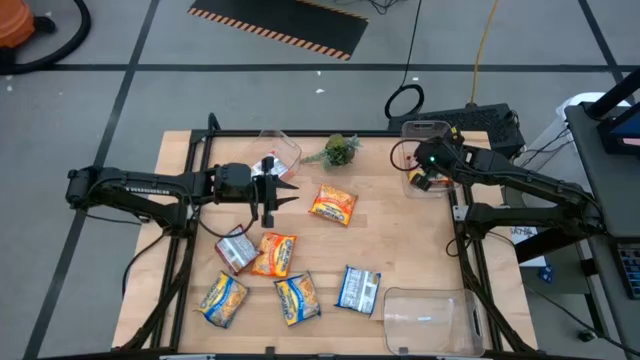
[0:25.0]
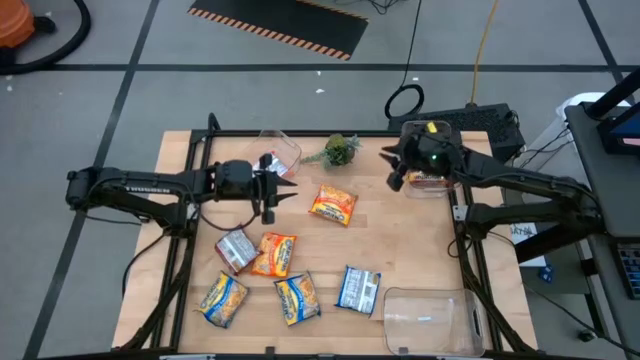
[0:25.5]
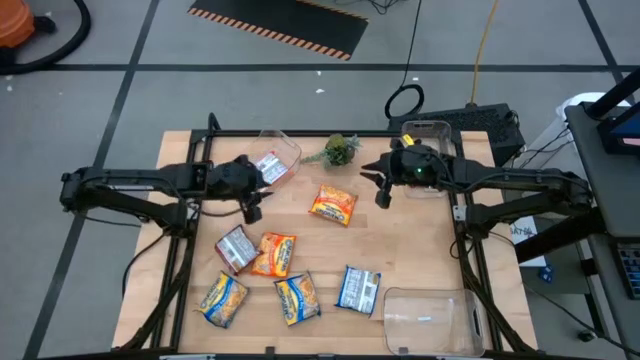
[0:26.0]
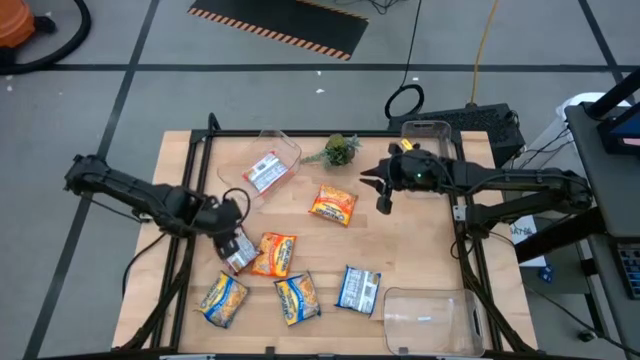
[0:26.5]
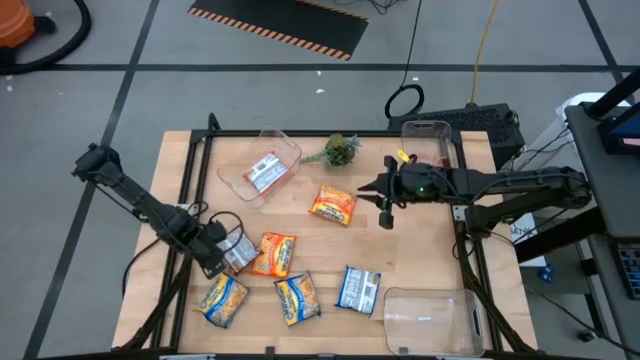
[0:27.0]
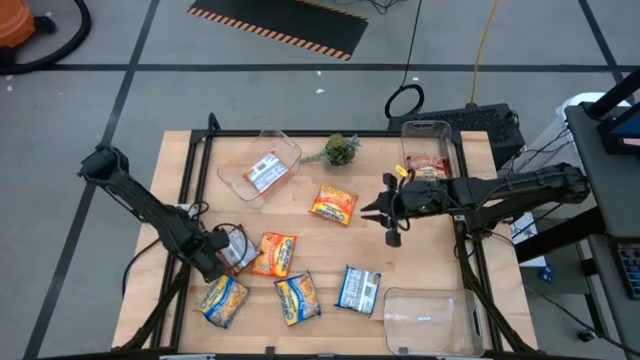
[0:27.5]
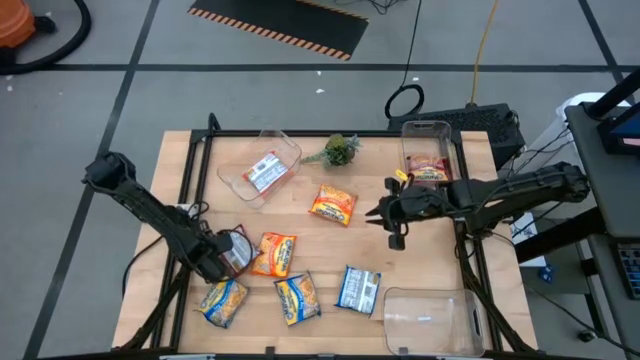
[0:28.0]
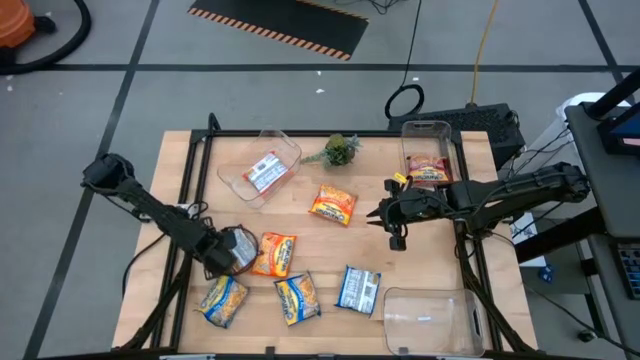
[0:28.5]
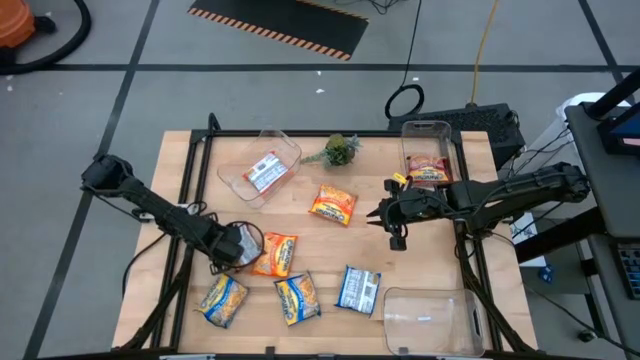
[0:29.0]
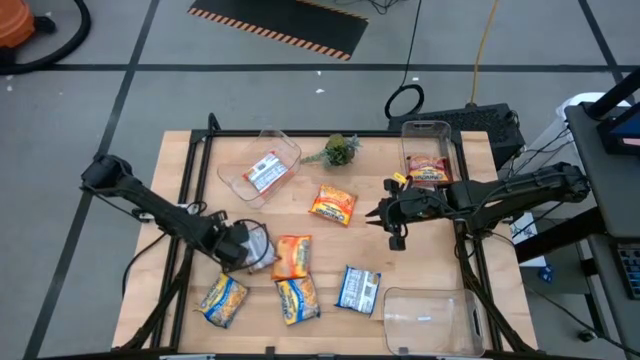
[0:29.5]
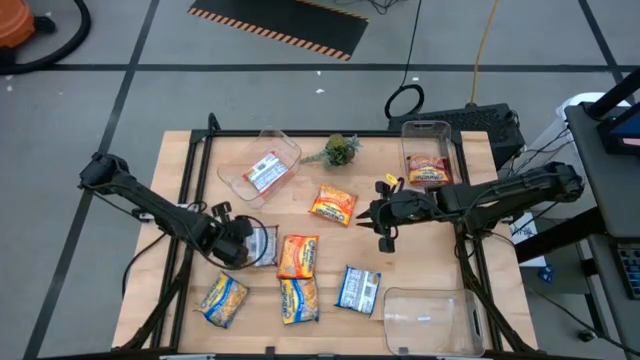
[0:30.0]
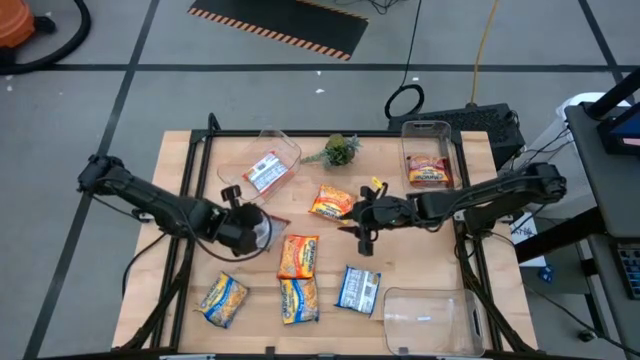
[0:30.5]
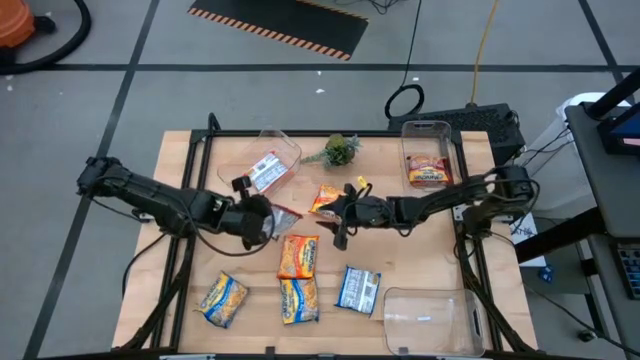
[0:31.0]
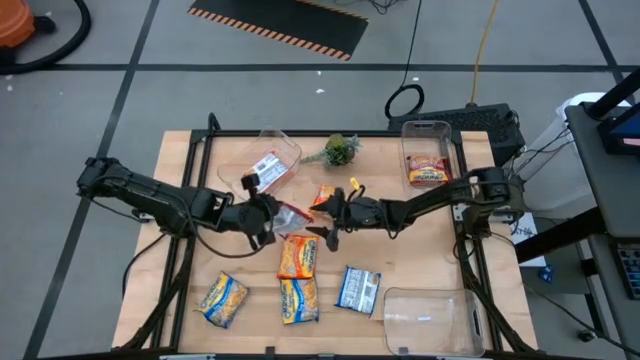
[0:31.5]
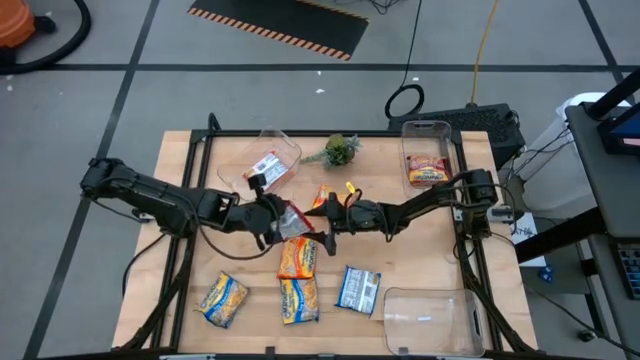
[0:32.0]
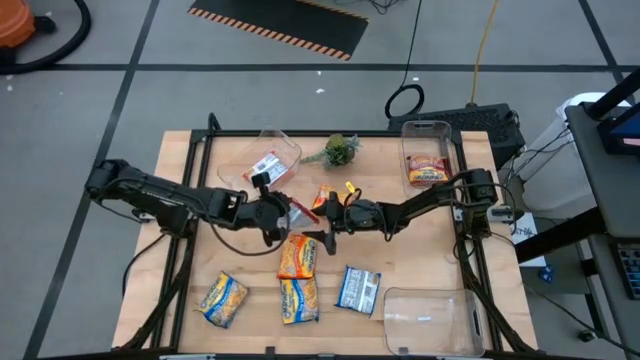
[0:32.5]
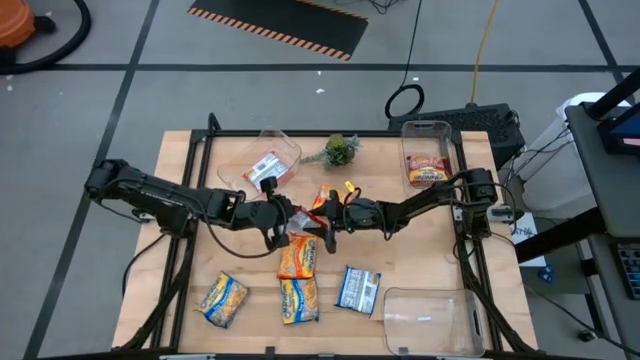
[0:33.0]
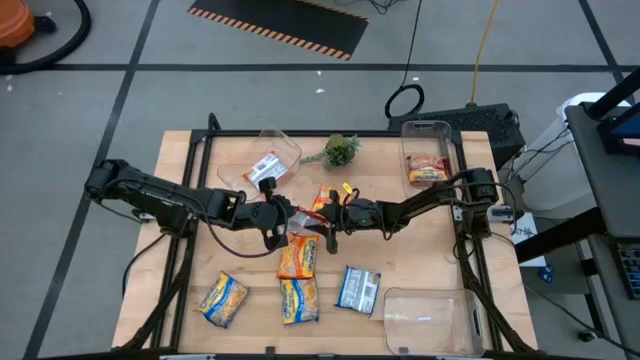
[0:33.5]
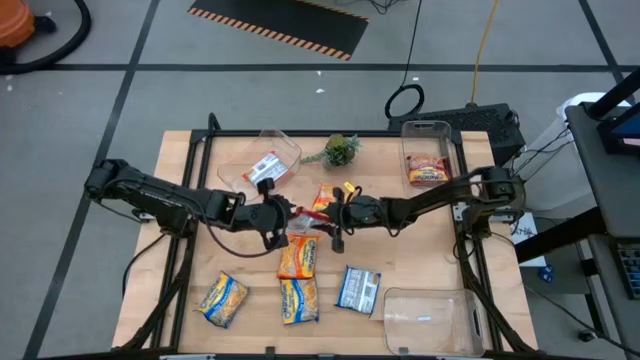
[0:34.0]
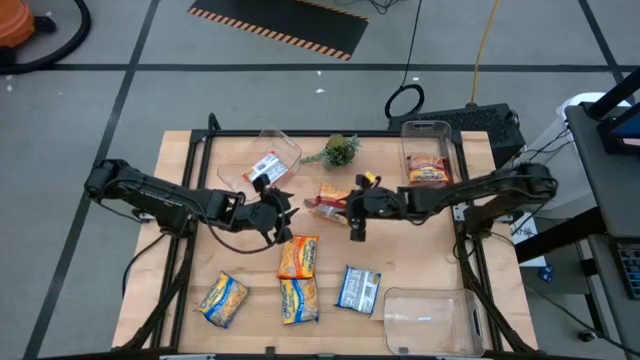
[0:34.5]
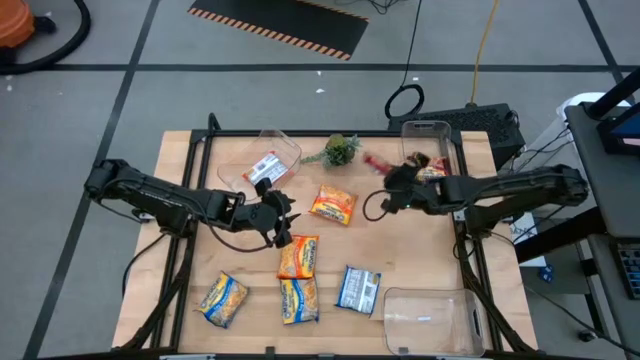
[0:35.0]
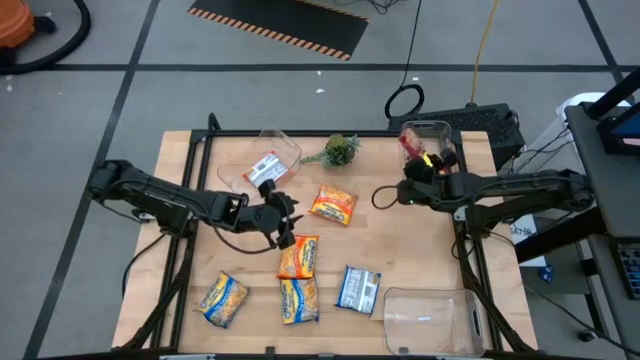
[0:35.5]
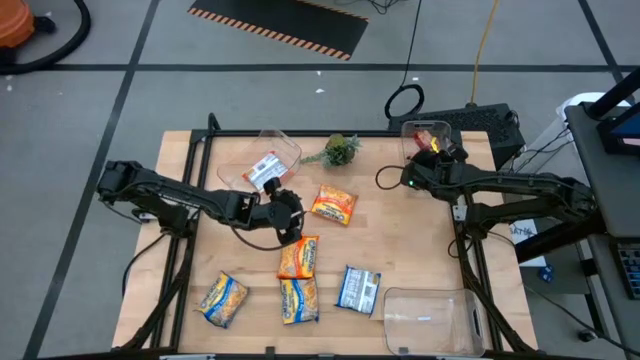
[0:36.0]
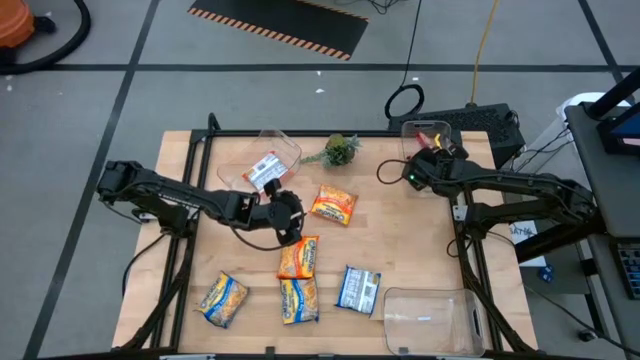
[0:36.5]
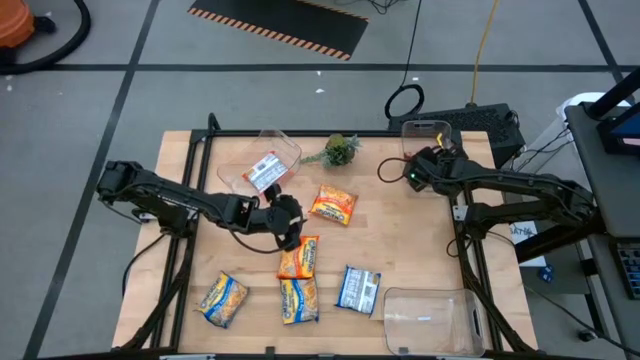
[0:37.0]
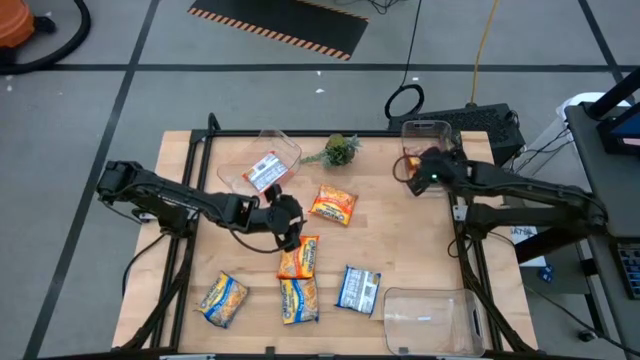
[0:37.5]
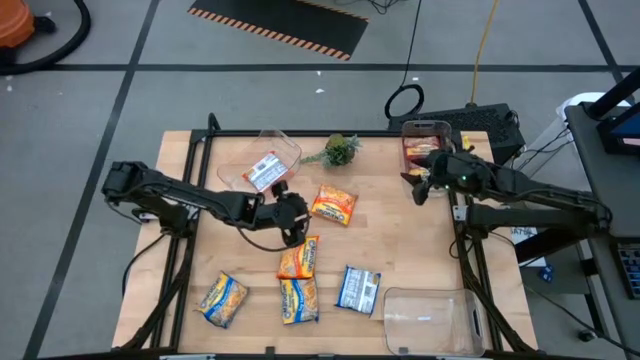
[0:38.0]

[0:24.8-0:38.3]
Task: Sort Maruchan noodles
Put the red noodle pack into the top right transparent bin

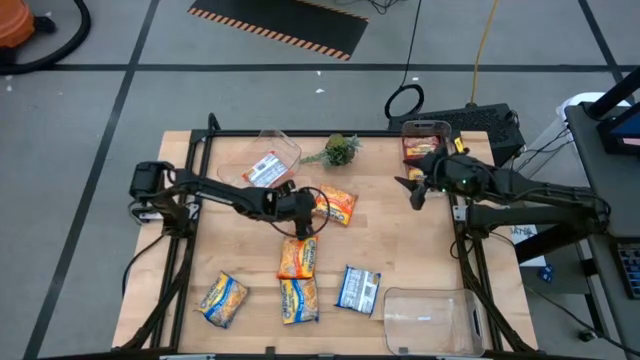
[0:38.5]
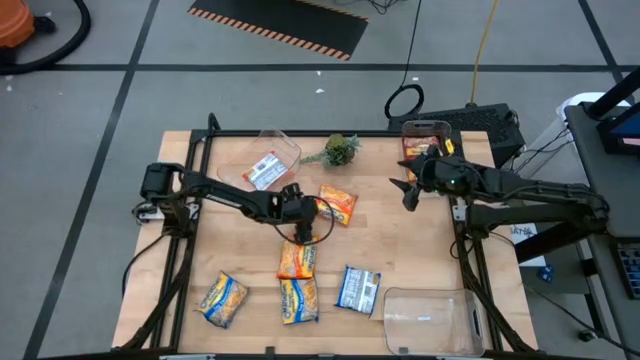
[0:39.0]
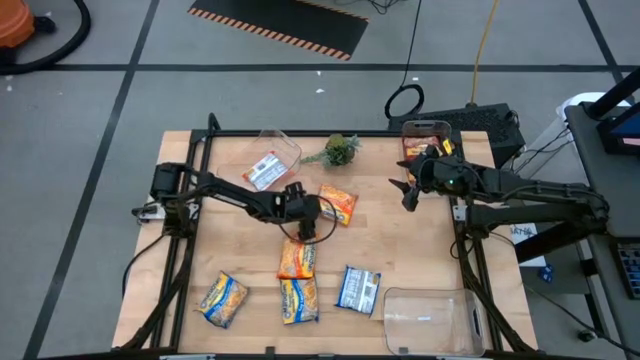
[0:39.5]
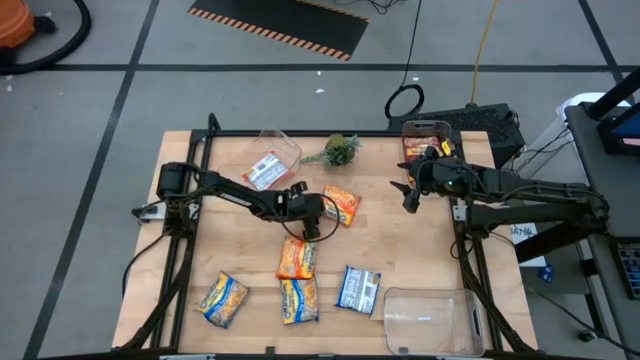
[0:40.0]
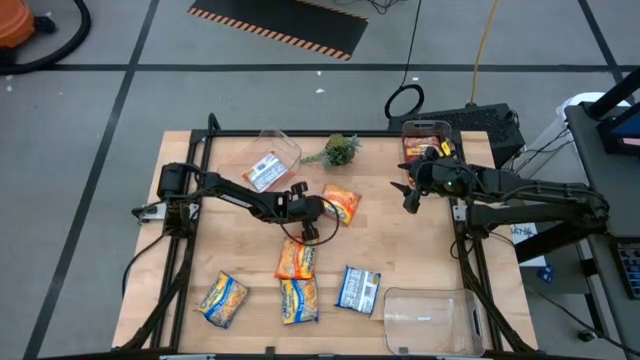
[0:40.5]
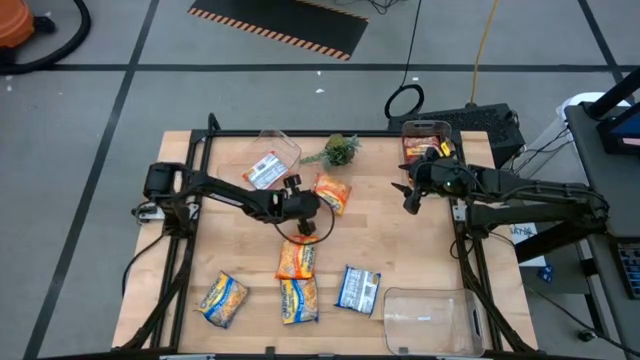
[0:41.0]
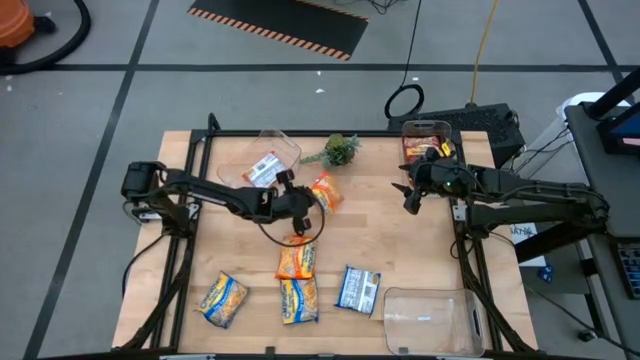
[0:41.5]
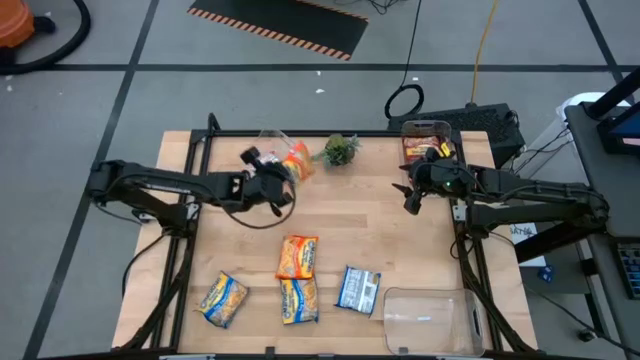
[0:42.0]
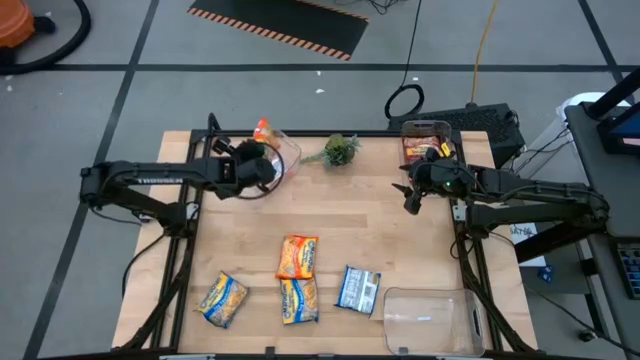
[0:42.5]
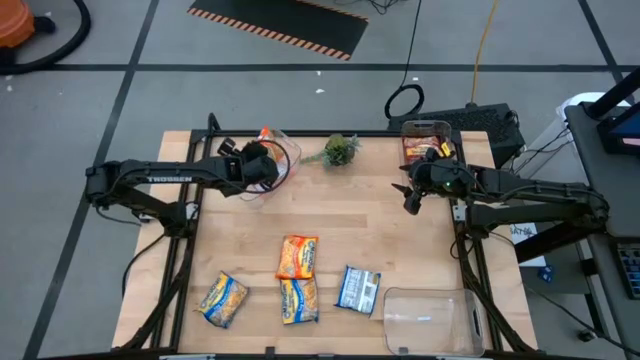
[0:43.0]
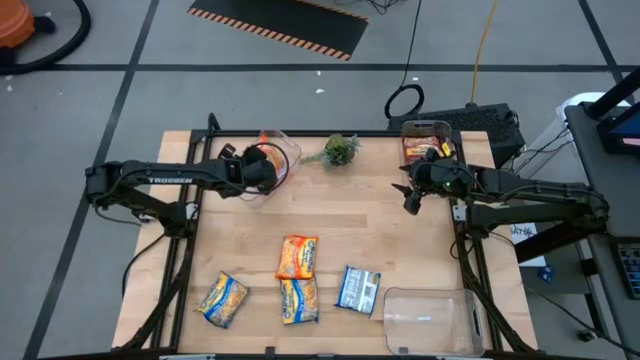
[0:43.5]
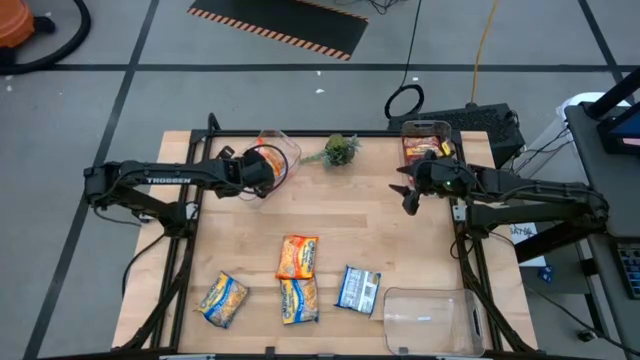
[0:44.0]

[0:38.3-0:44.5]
Put the top orange noodle pack into the top left transparent bin
